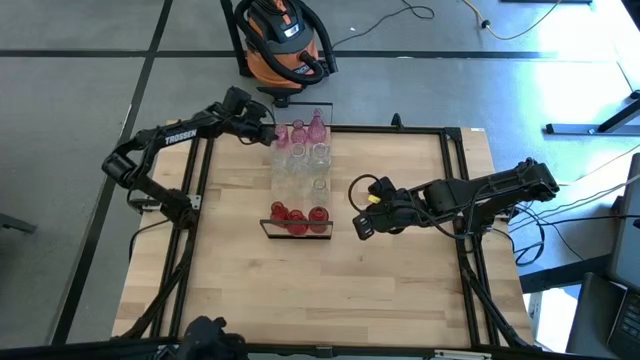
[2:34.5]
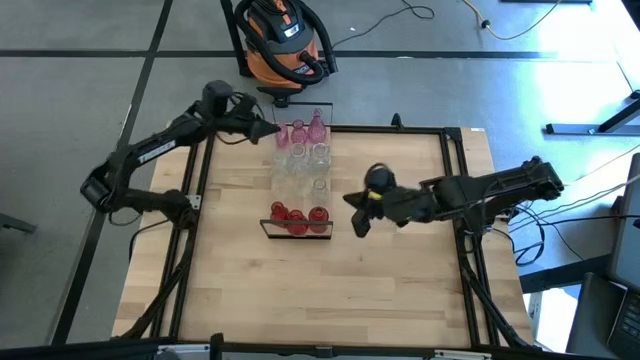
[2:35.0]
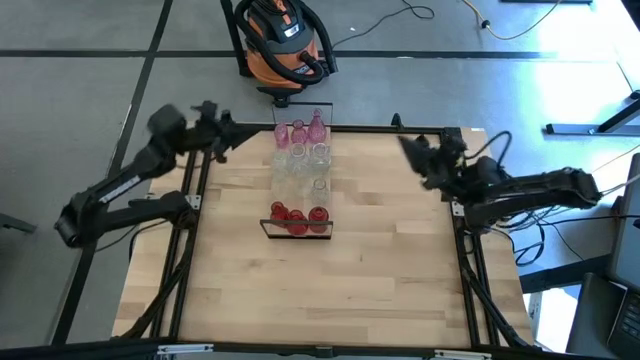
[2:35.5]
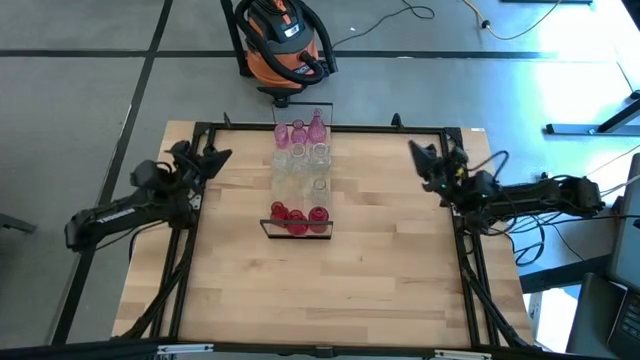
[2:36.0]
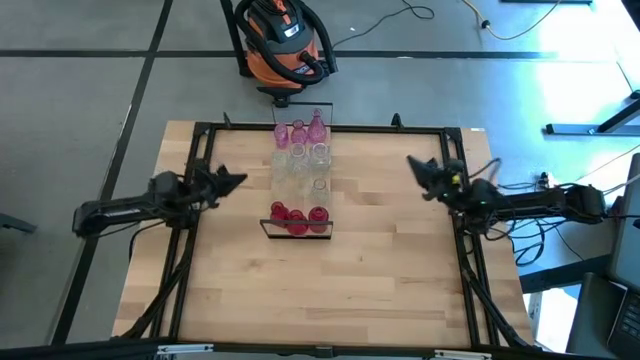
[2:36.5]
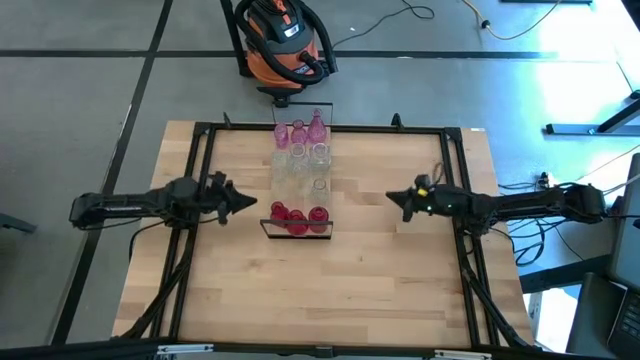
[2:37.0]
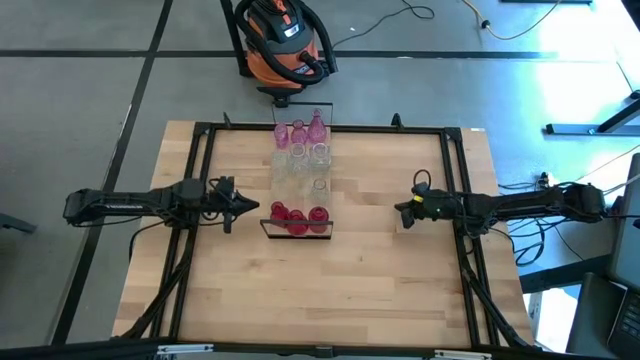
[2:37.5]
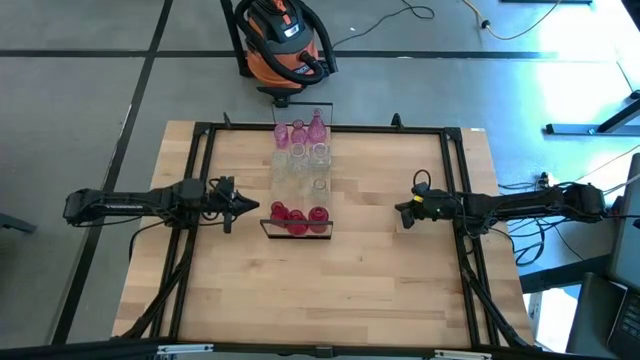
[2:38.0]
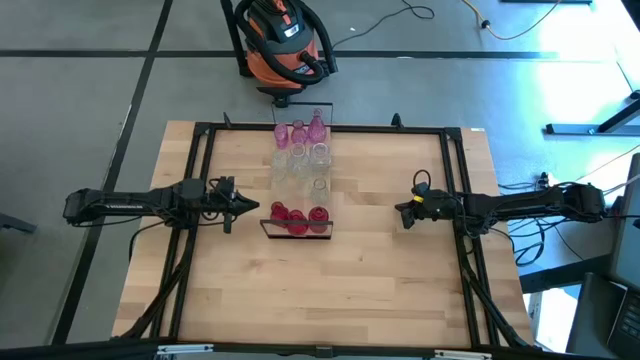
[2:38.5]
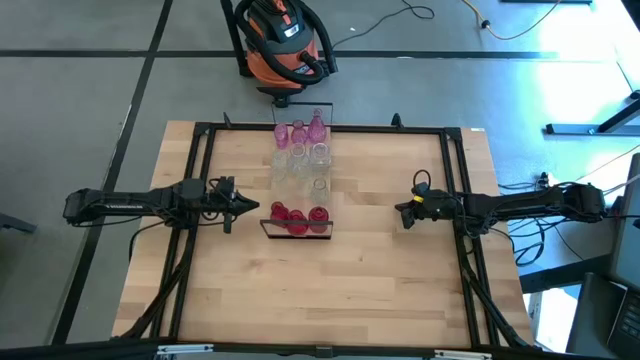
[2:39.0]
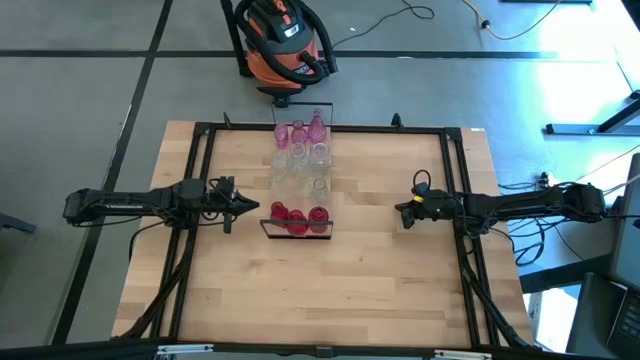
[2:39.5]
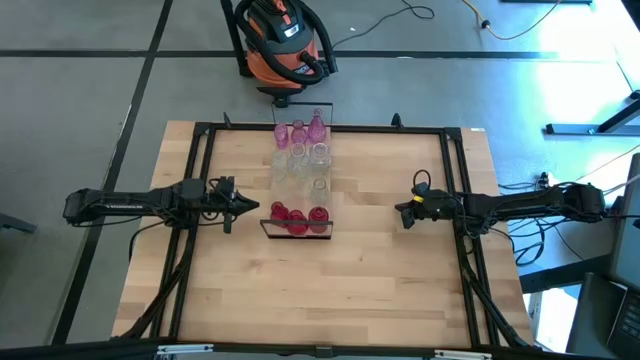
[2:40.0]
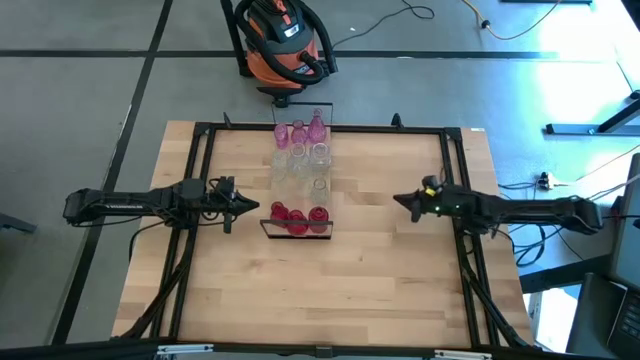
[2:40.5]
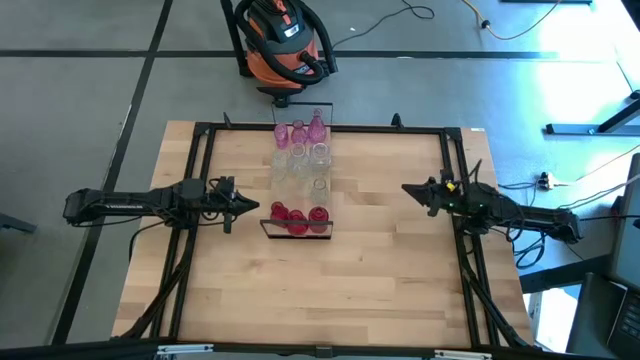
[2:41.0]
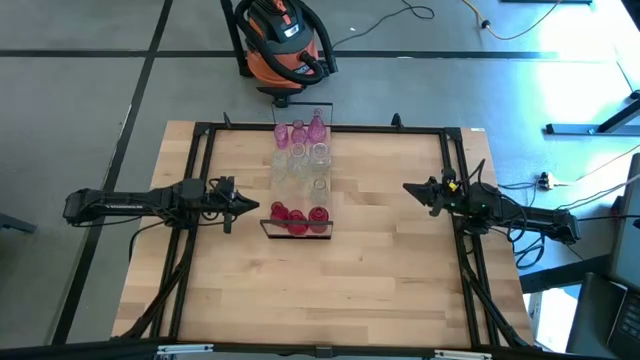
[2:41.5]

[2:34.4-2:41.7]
Task: sort vases onto shelf
Return to Home Position

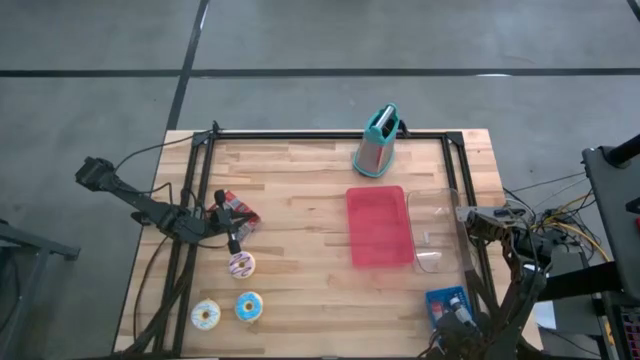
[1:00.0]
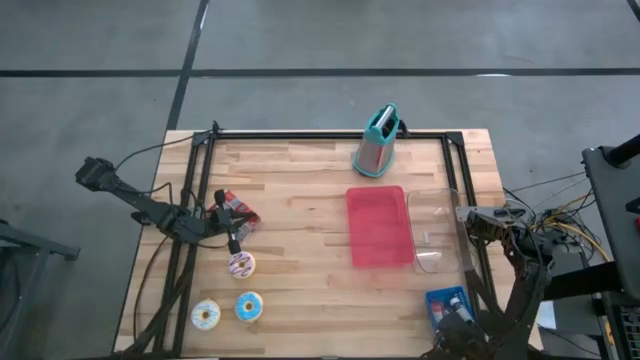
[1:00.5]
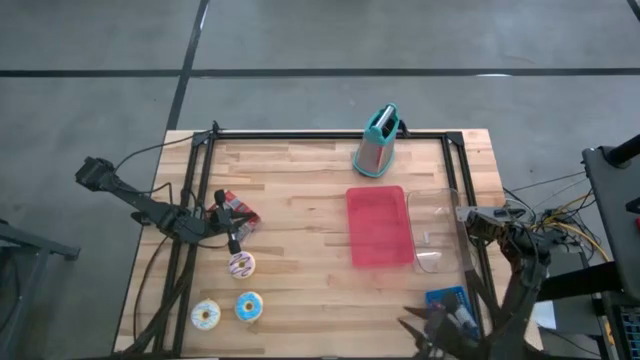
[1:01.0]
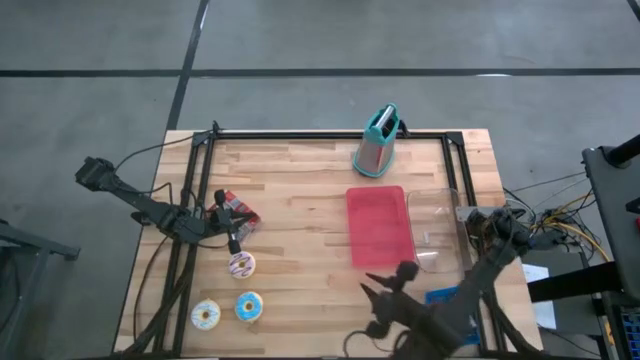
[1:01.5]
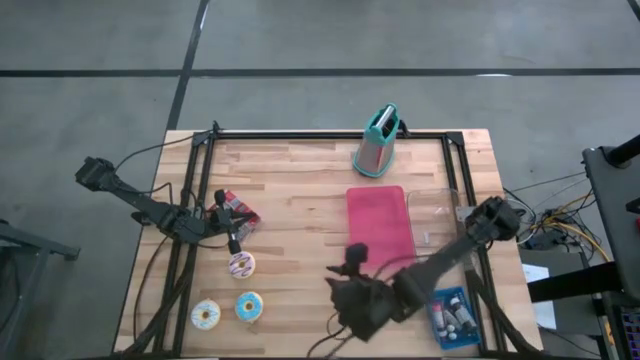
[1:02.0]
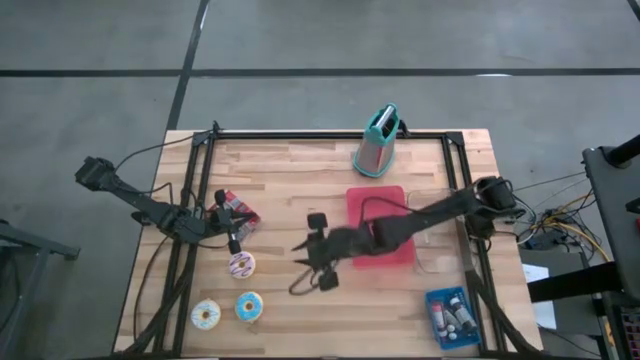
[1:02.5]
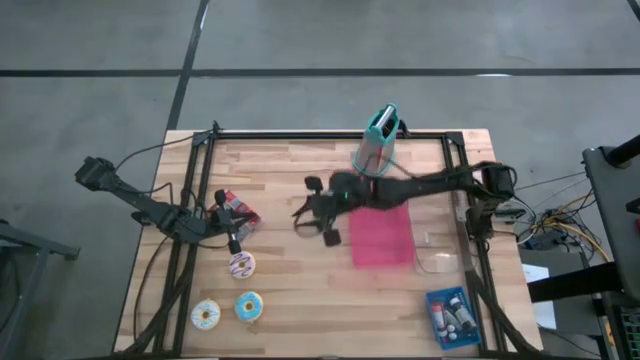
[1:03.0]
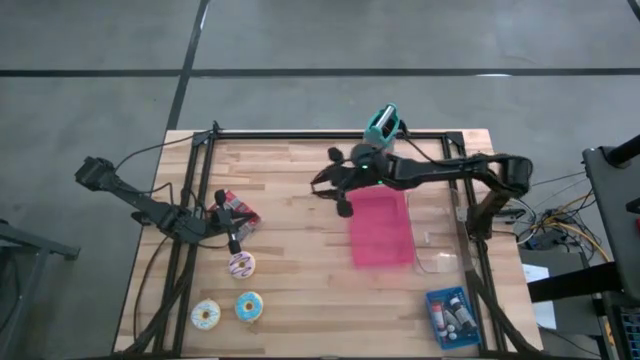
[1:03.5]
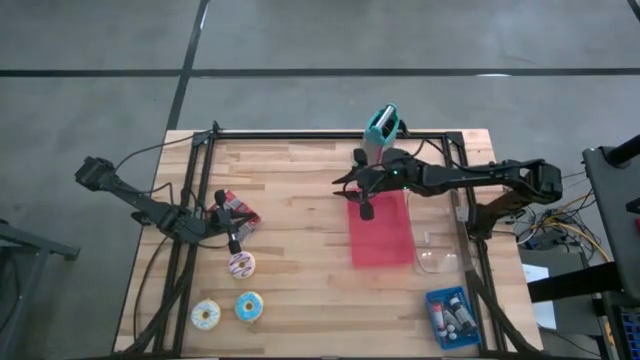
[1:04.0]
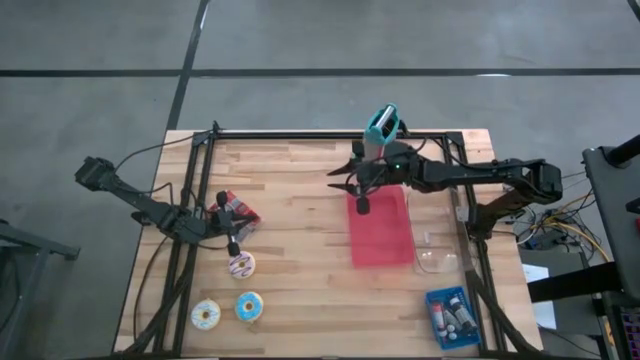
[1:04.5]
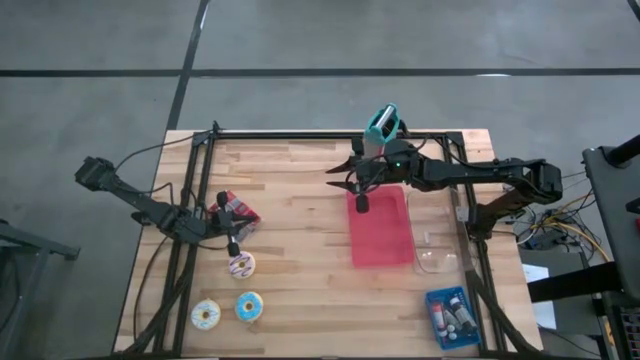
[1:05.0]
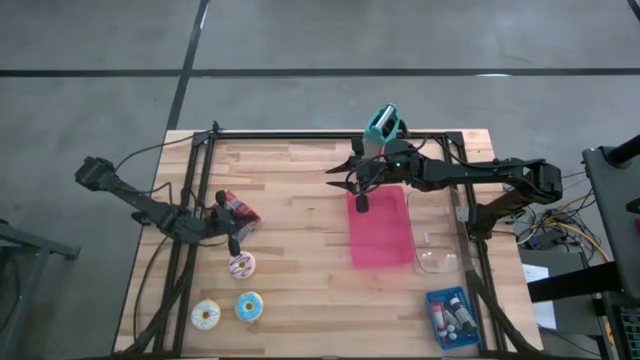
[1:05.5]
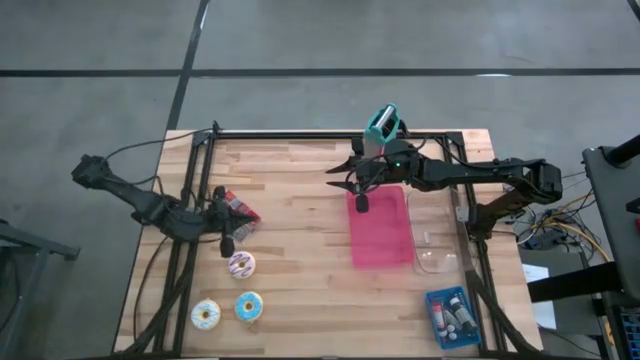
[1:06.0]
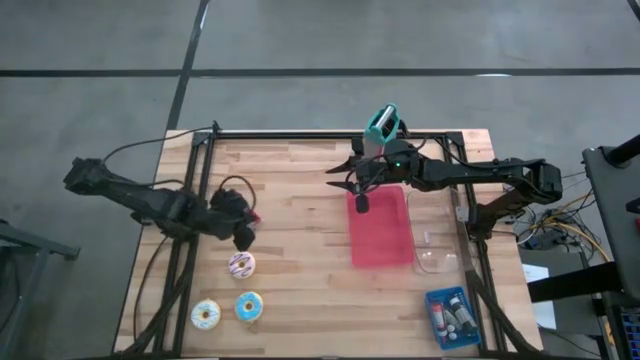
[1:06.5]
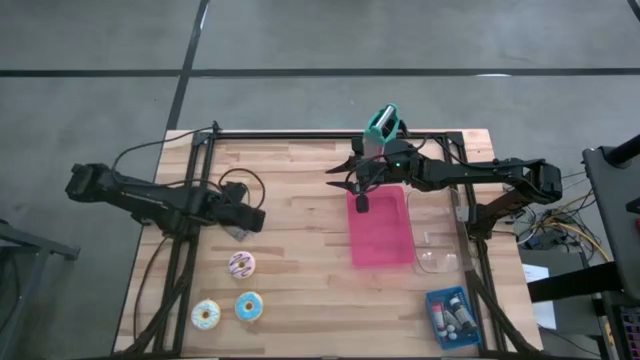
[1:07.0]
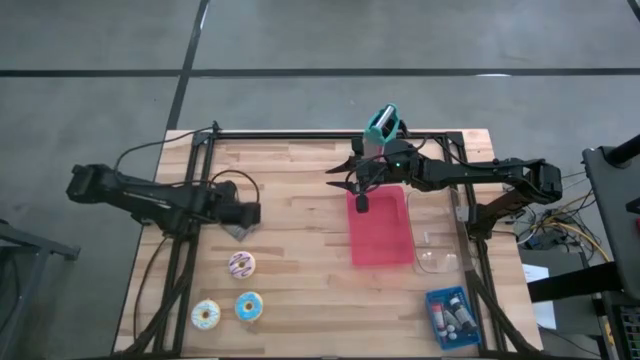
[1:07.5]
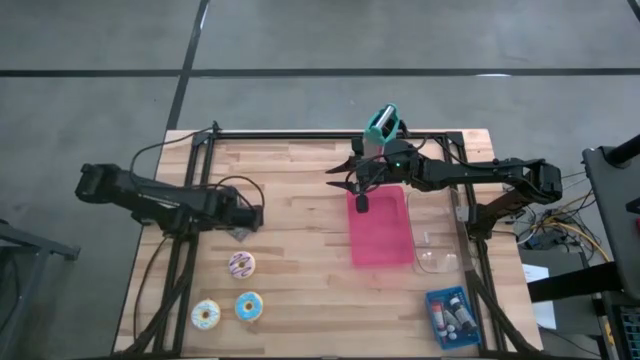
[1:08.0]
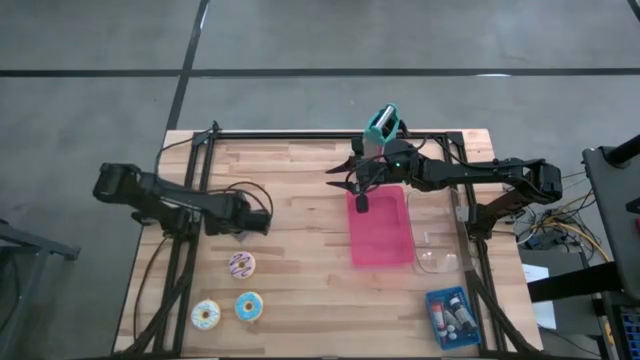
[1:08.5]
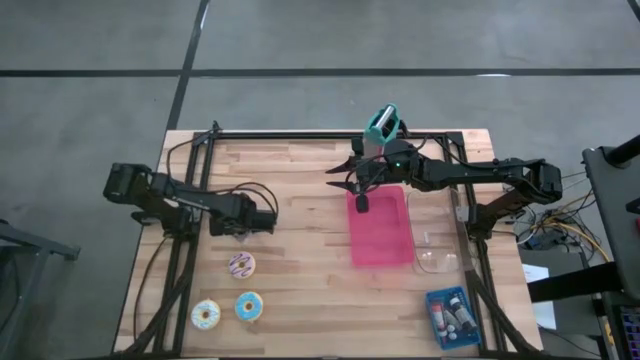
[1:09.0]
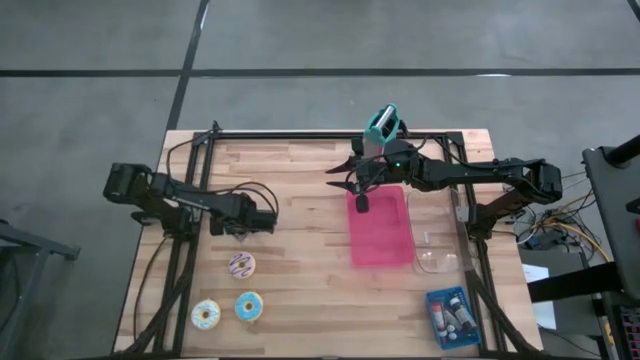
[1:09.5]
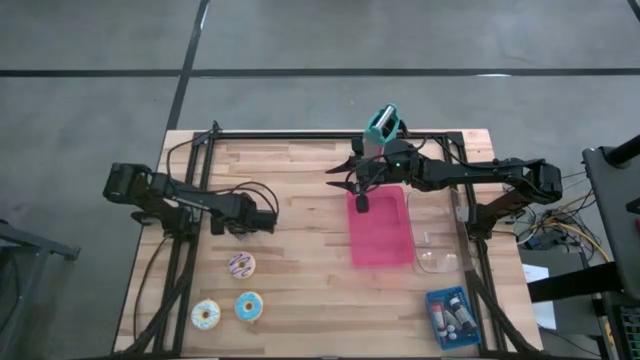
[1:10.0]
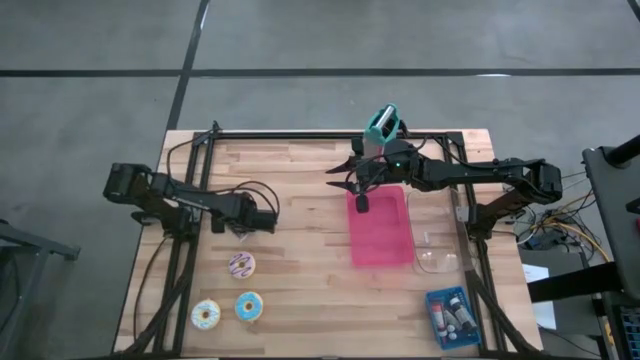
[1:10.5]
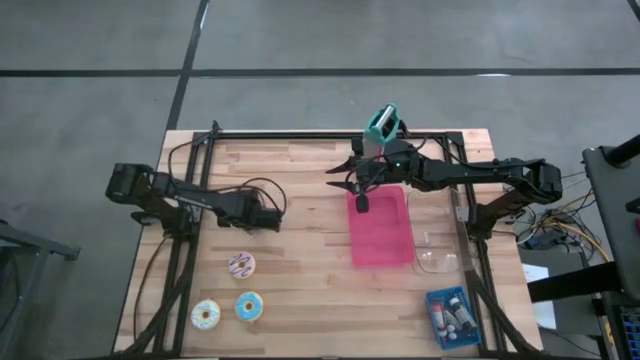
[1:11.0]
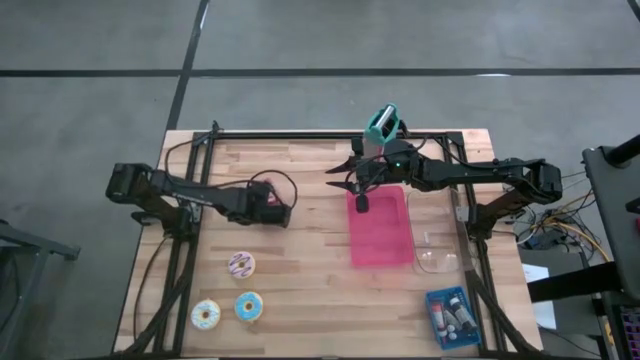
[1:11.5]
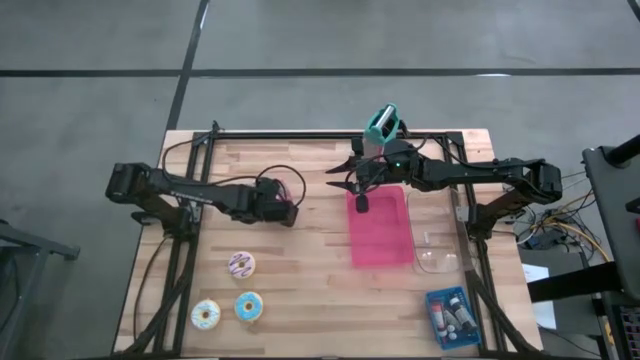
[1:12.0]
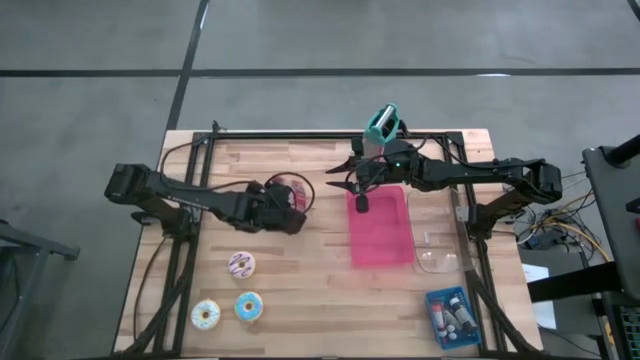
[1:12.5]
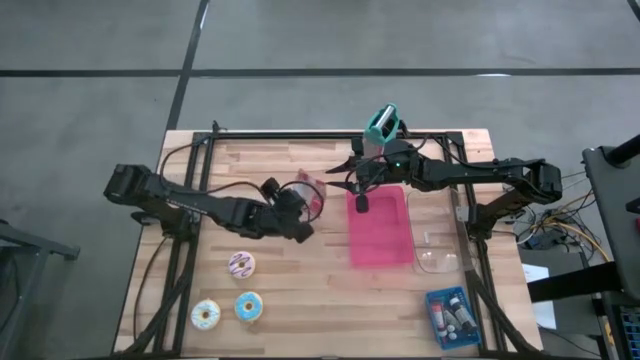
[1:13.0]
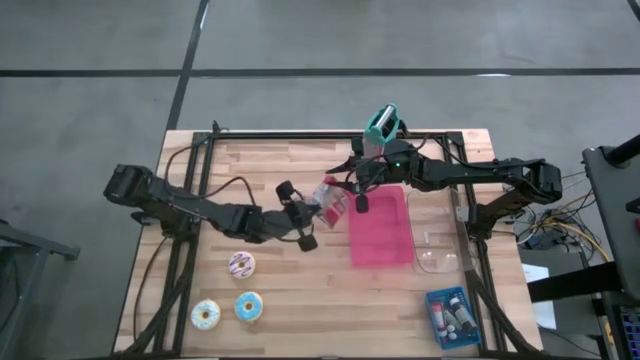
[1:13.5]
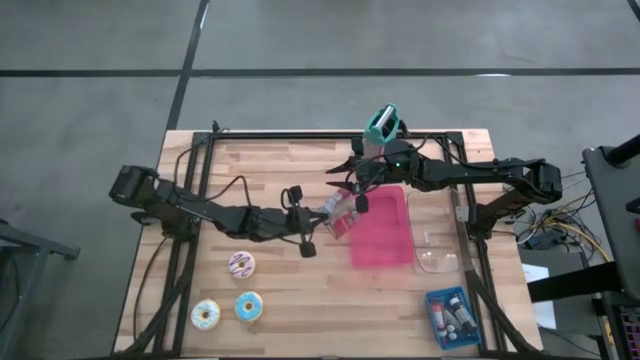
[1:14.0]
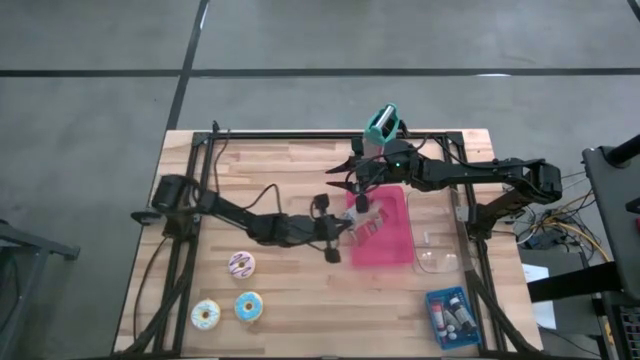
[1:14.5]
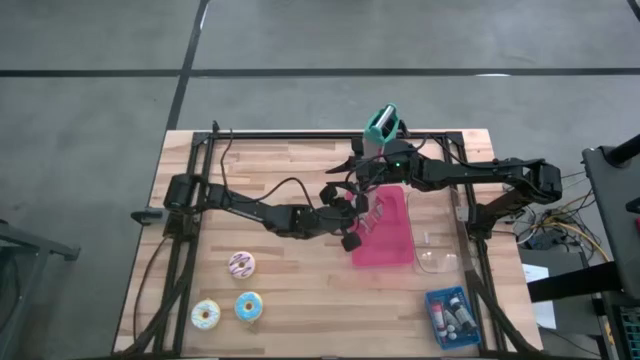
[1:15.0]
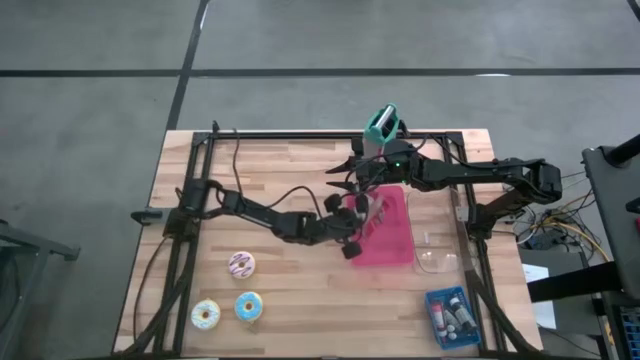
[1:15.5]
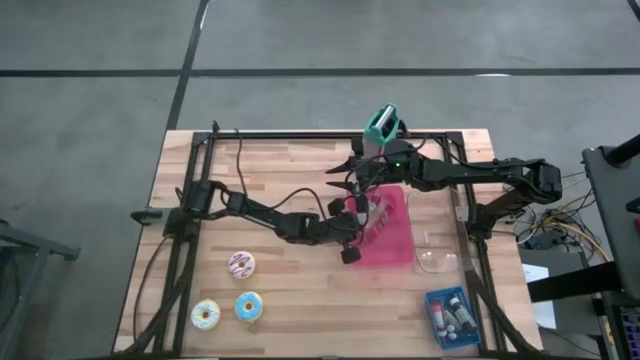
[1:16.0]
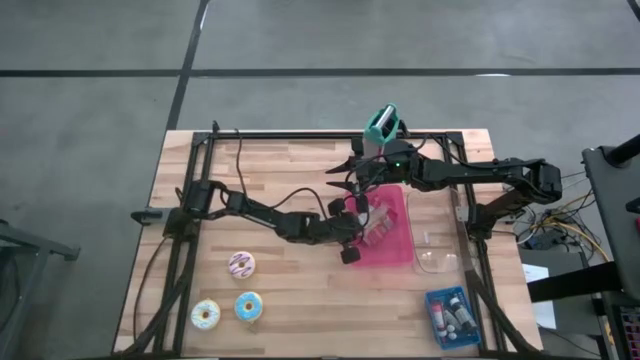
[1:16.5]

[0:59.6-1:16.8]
Task: Pick & Place Food Item
Put the popcorn bag into the pink bin
